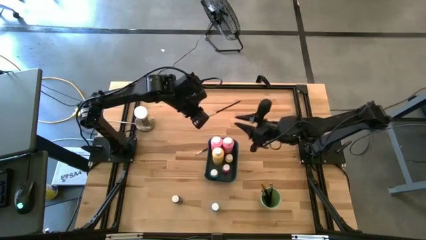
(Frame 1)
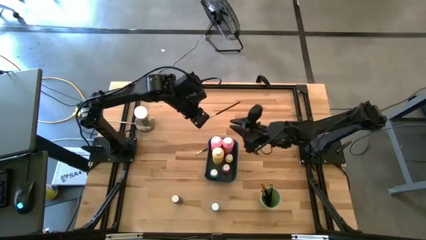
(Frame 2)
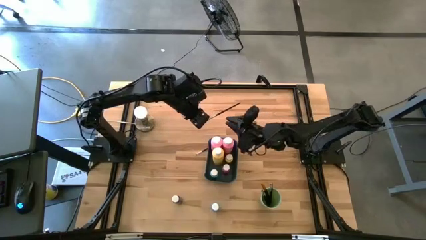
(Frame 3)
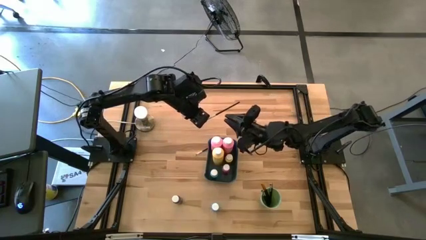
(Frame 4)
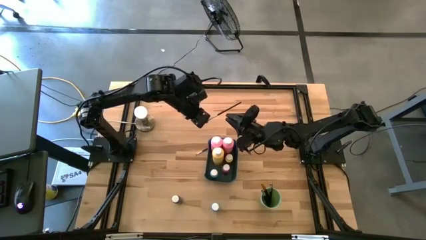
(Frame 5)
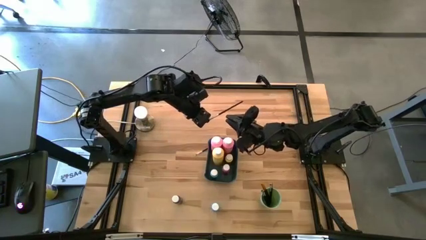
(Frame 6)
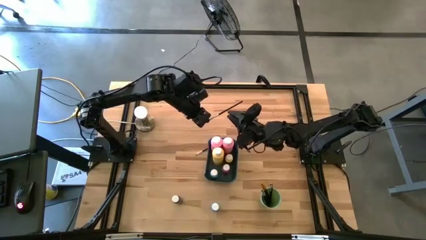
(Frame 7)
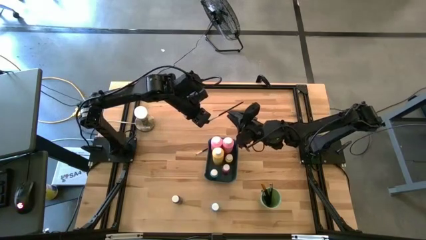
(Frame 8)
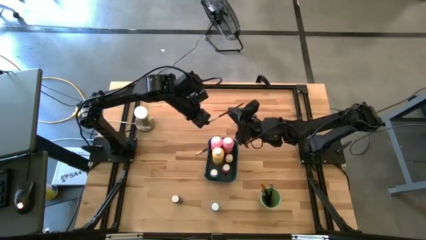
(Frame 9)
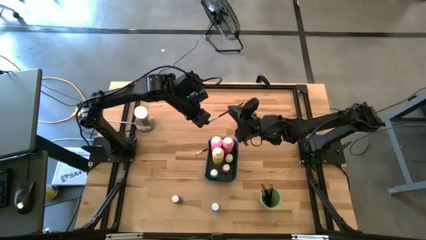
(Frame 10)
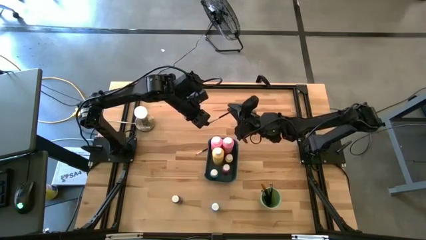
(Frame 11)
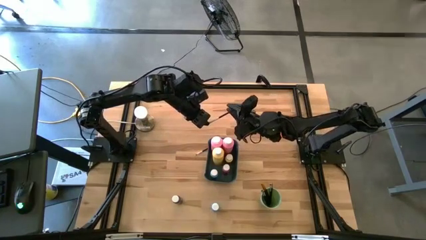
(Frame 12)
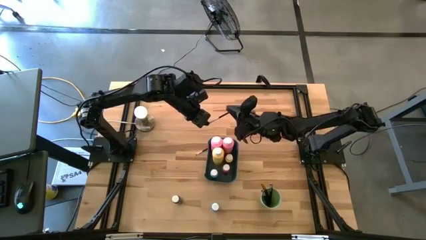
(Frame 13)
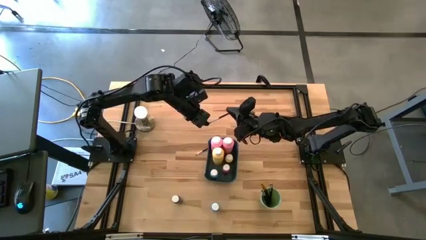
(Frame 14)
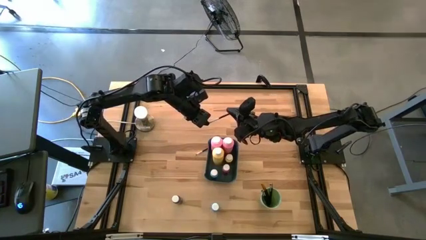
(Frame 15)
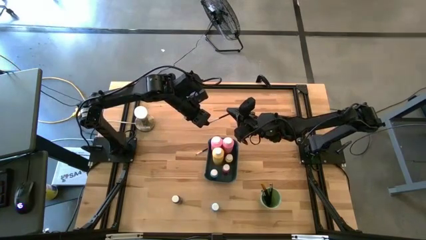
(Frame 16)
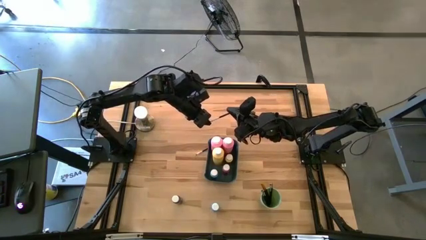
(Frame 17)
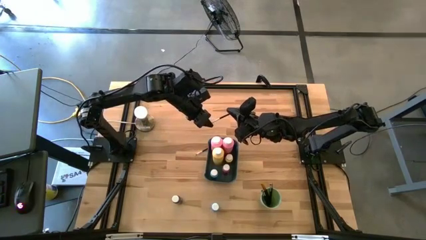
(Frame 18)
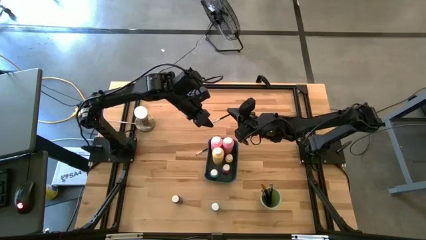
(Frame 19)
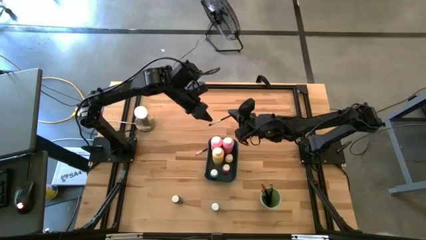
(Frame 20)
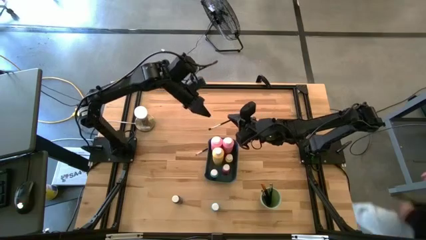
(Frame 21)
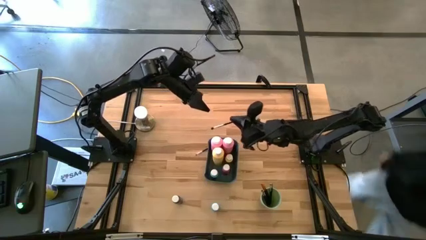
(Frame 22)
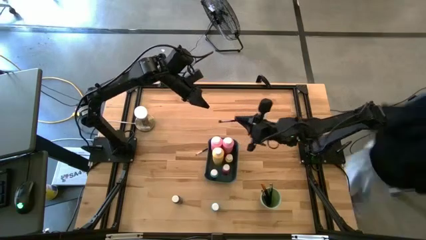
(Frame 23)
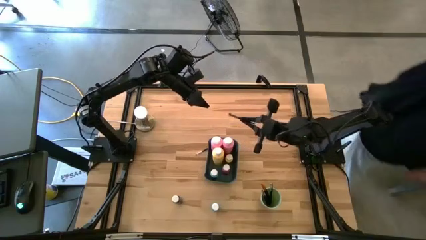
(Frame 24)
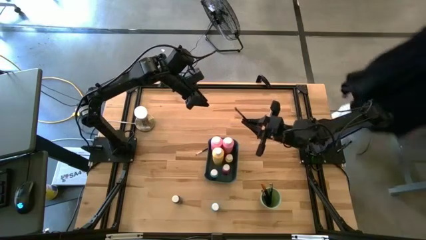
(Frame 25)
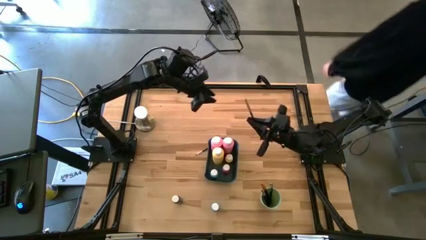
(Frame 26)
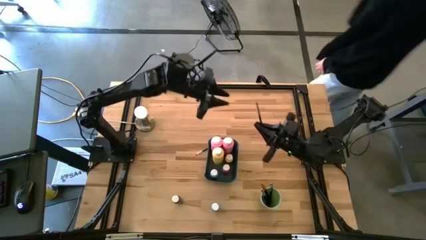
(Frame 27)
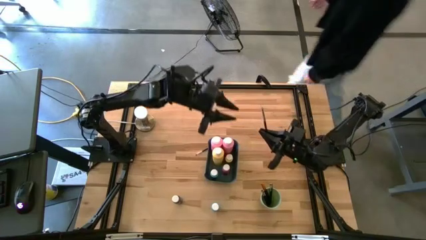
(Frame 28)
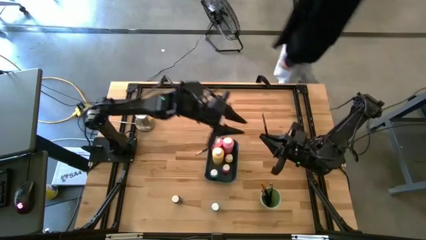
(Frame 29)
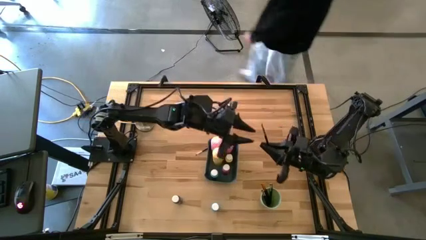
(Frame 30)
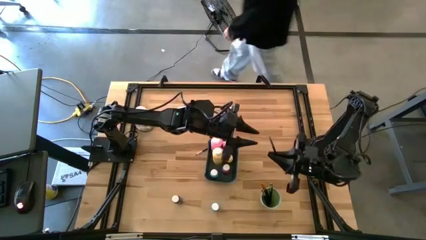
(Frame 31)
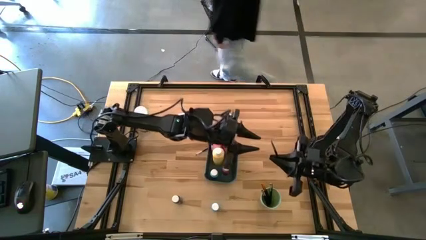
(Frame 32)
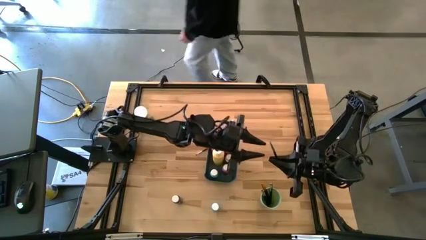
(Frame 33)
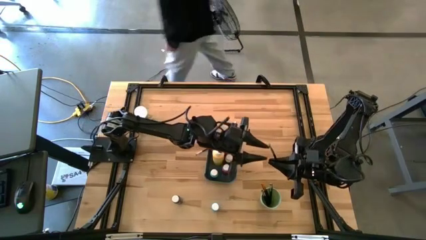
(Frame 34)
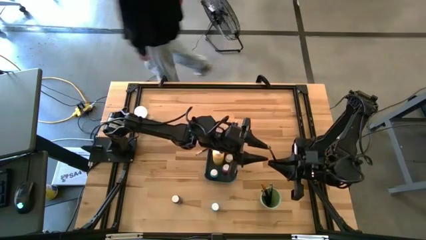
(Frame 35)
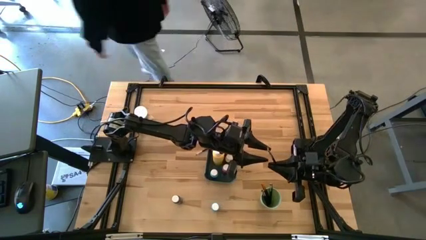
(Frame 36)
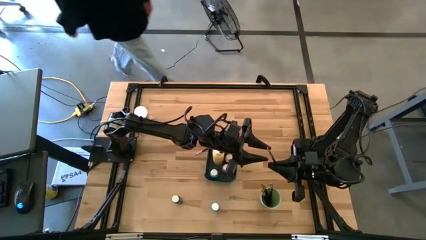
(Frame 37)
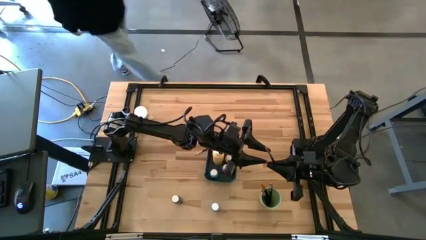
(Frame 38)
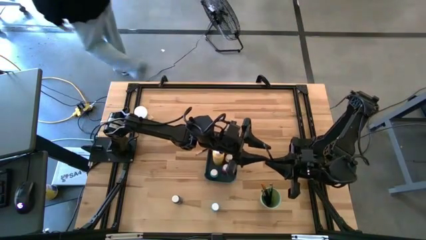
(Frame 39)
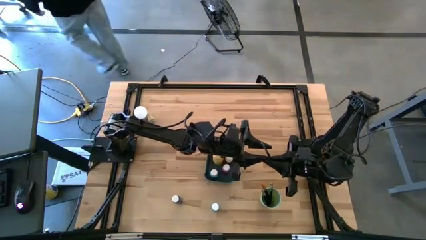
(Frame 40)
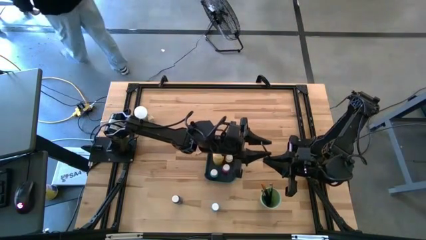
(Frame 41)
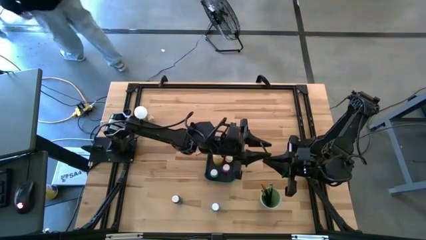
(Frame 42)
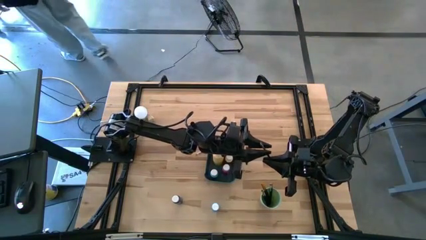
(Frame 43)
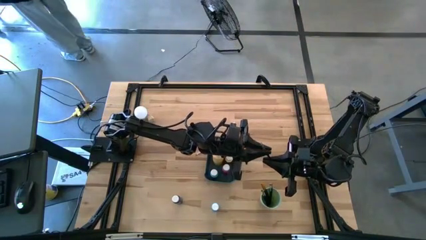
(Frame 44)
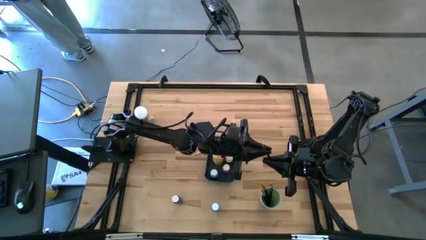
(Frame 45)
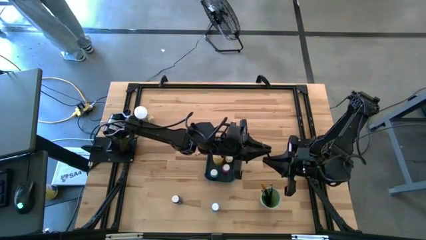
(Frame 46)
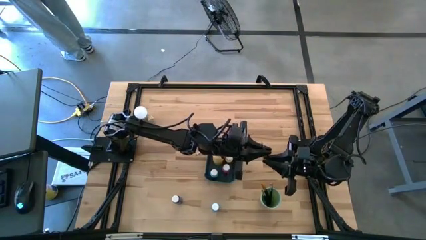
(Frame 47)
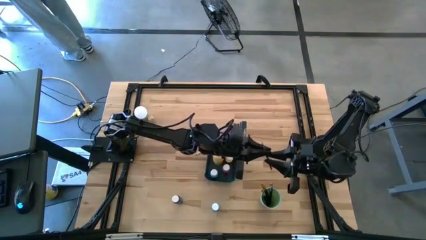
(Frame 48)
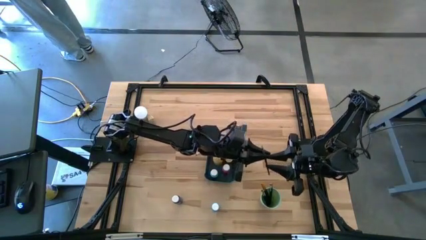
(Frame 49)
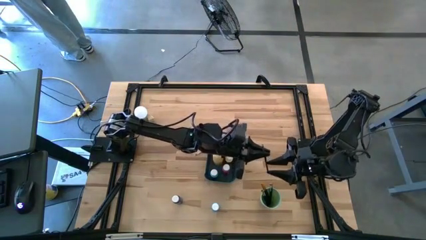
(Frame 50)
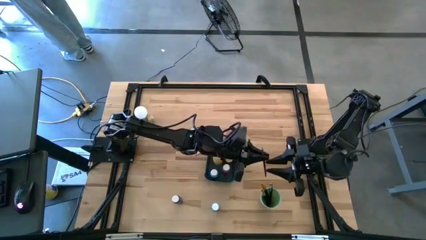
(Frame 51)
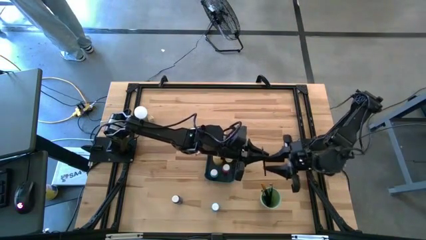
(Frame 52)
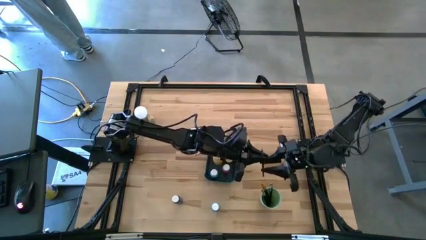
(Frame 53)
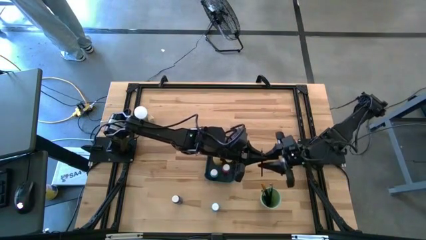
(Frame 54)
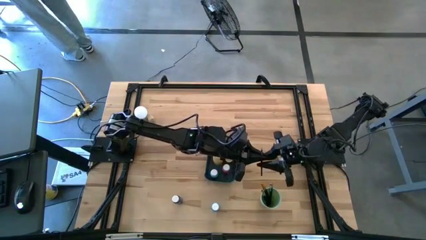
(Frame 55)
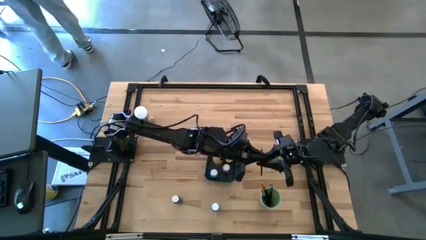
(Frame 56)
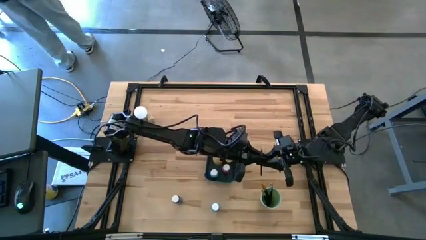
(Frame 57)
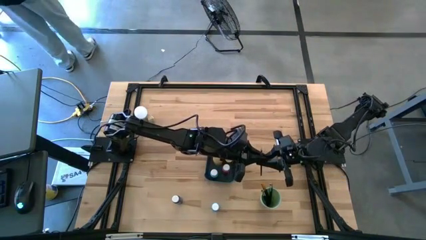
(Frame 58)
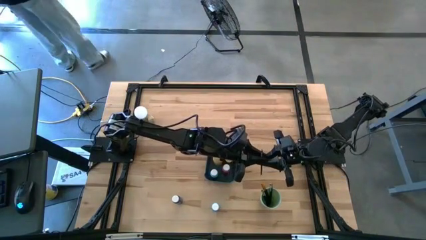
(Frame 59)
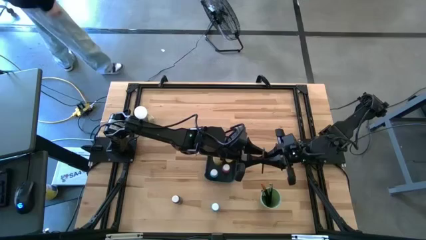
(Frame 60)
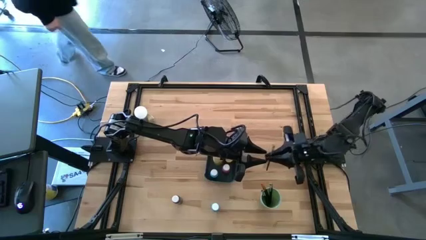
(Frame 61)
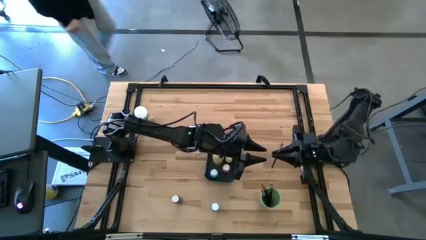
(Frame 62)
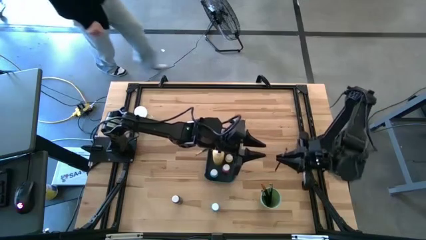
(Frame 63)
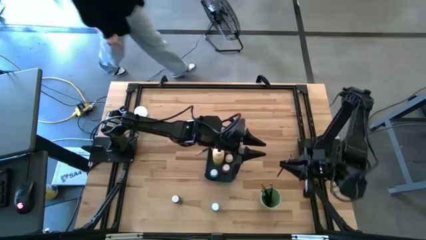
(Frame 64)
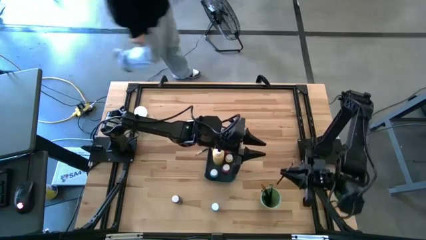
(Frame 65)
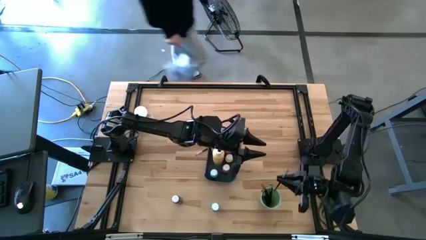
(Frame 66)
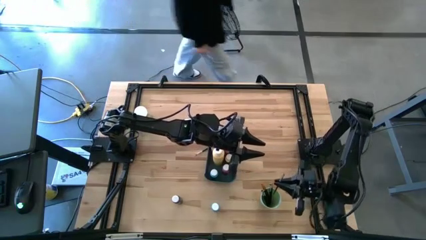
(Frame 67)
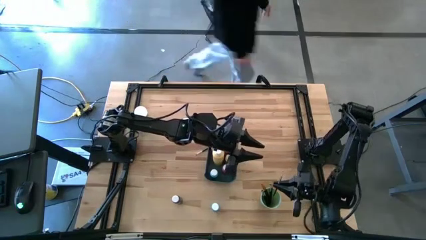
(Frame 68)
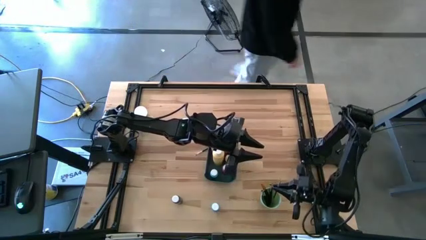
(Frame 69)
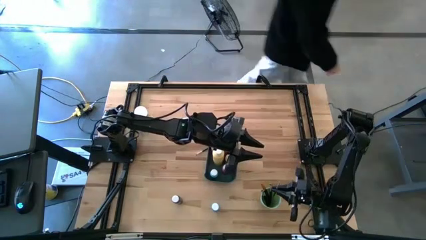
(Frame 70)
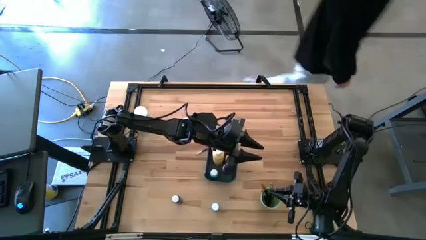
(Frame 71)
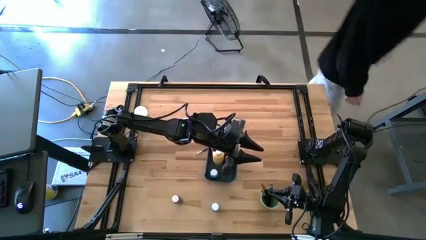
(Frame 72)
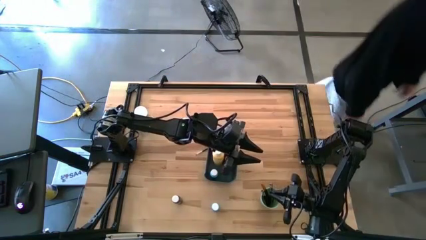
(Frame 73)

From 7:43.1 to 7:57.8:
Task: Pick & Place Paint Supplies
Put the black and silver paint brush into the green cup

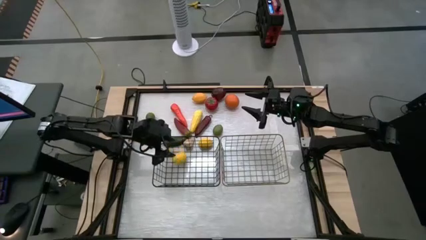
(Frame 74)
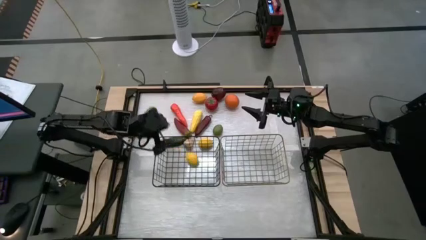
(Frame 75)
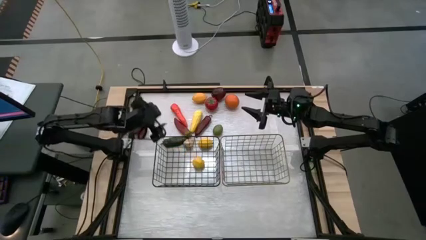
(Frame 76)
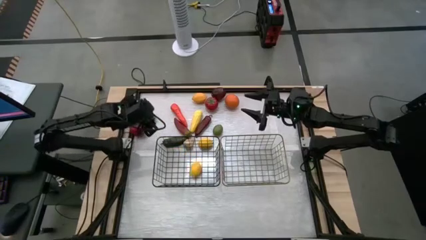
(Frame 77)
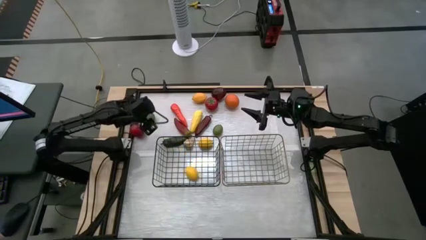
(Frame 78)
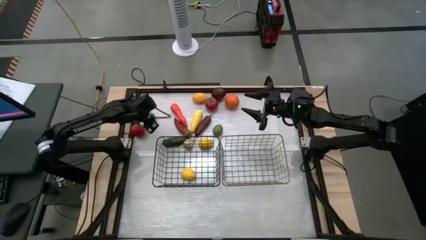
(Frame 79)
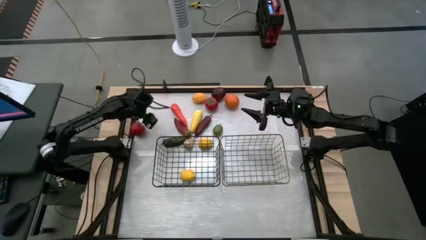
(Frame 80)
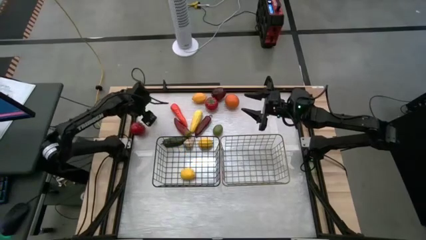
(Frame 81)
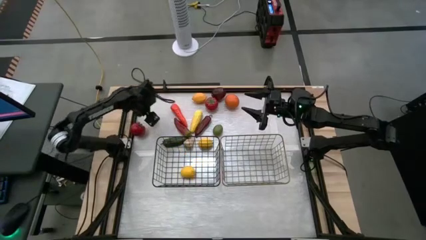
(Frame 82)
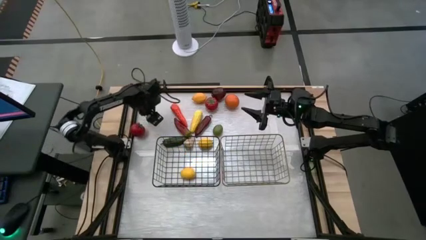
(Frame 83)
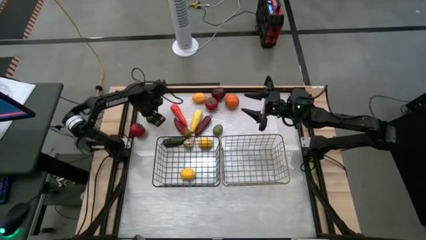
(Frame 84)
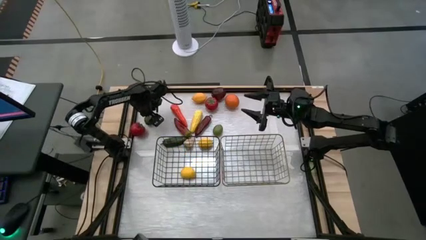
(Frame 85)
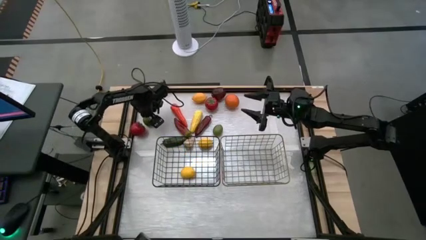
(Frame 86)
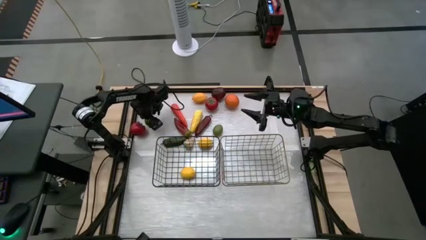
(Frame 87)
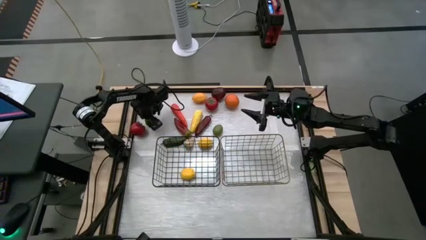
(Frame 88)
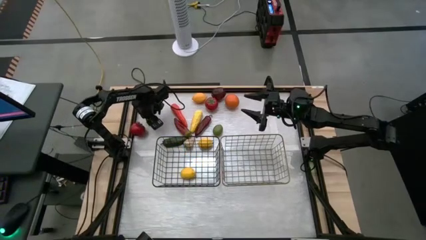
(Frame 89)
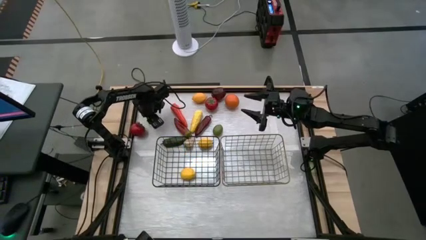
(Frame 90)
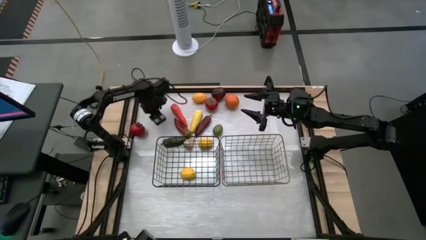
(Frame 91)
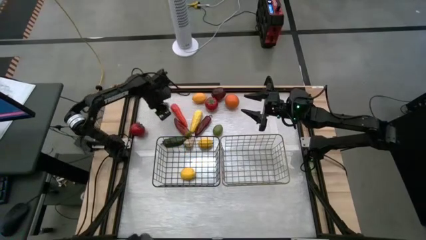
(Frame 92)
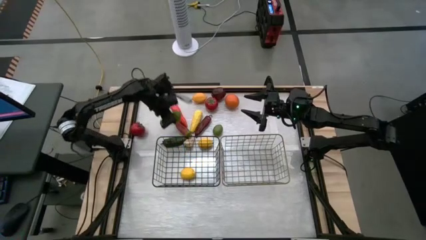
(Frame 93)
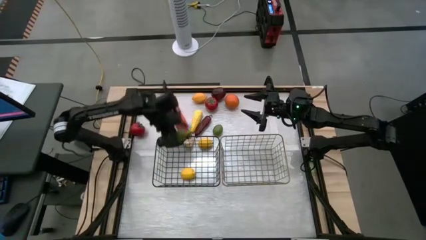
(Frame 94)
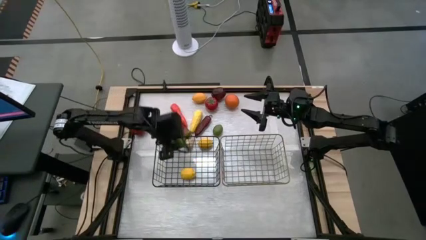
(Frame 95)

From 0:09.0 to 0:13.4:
Task: Sort produce into baskets
Put the left green lime into the black wire basket
